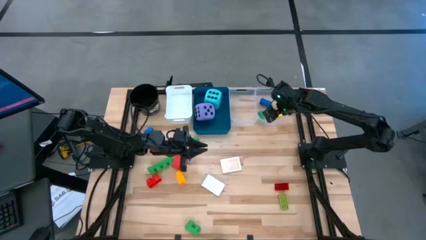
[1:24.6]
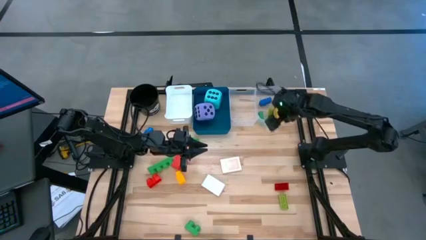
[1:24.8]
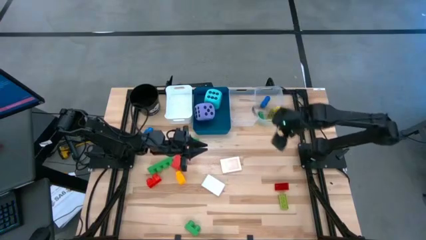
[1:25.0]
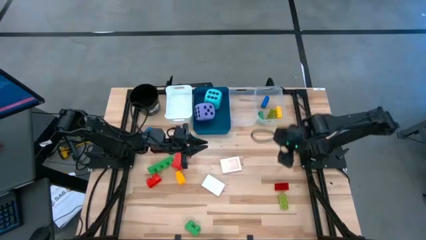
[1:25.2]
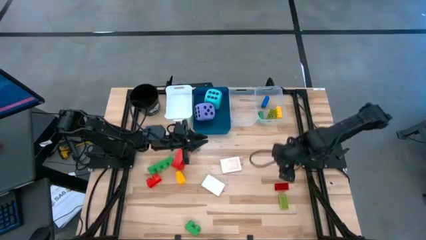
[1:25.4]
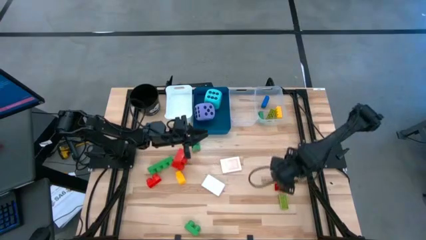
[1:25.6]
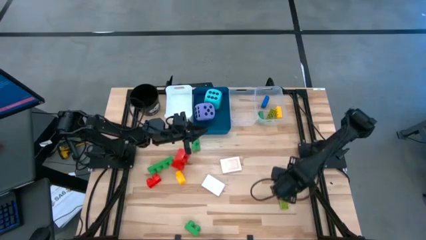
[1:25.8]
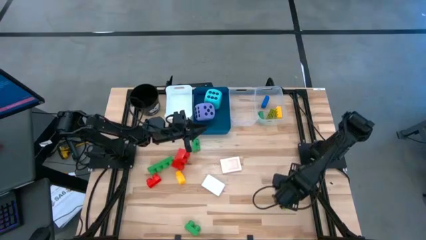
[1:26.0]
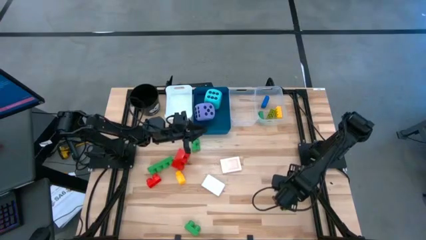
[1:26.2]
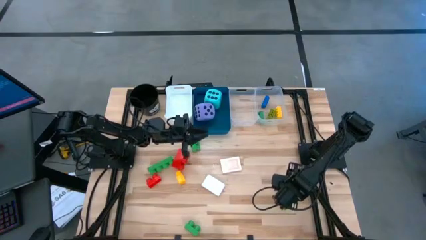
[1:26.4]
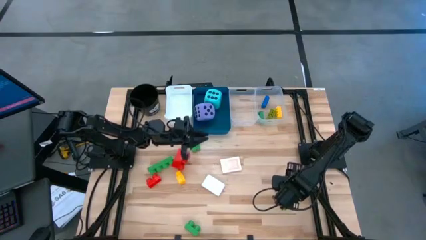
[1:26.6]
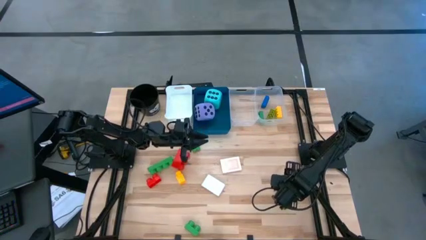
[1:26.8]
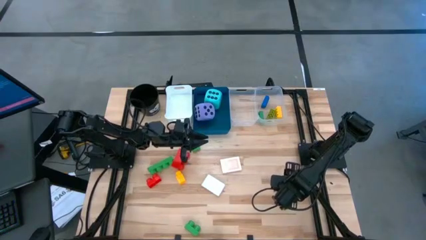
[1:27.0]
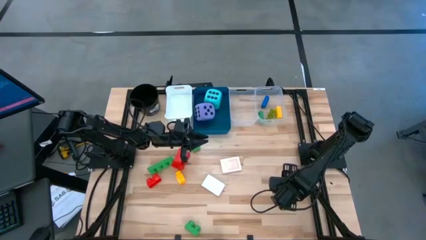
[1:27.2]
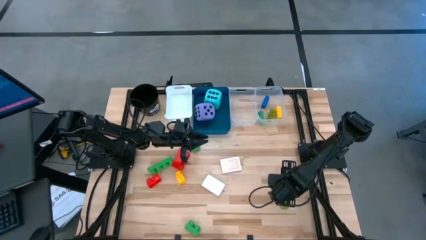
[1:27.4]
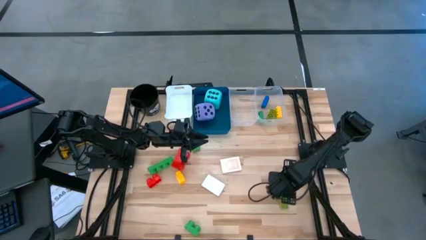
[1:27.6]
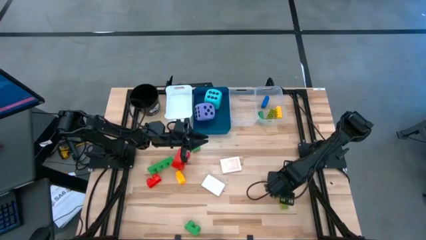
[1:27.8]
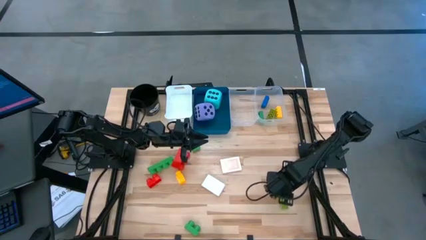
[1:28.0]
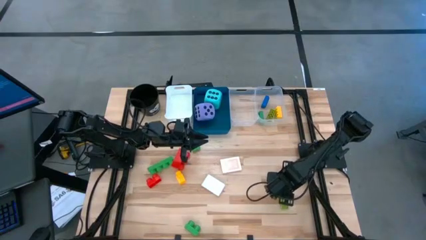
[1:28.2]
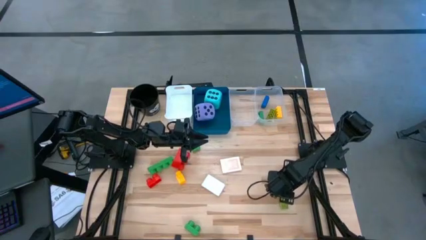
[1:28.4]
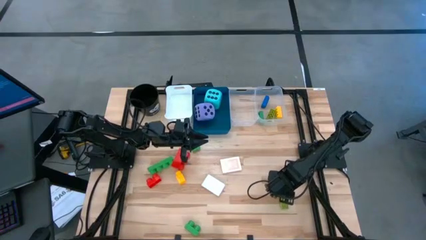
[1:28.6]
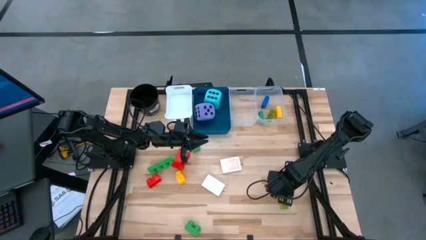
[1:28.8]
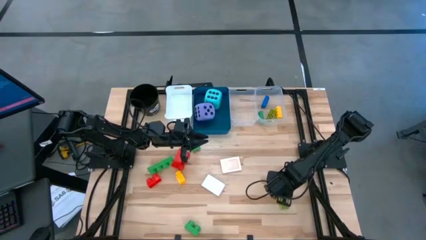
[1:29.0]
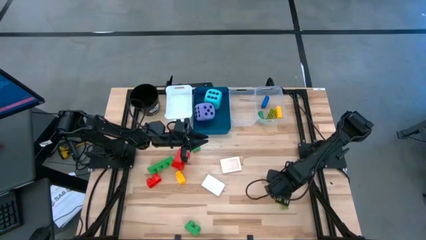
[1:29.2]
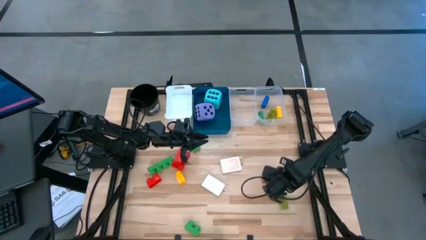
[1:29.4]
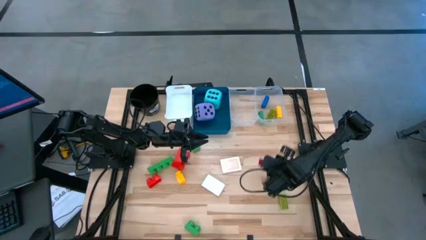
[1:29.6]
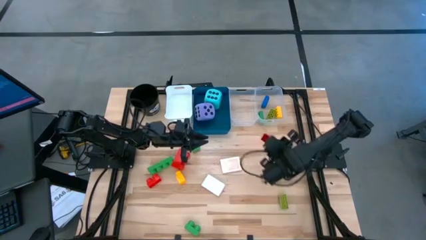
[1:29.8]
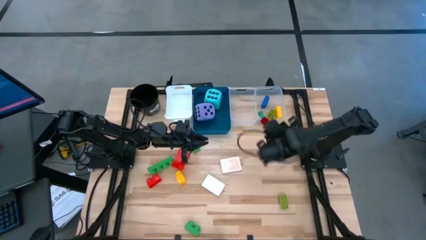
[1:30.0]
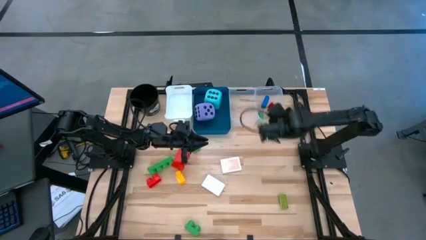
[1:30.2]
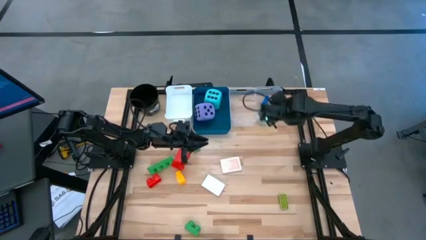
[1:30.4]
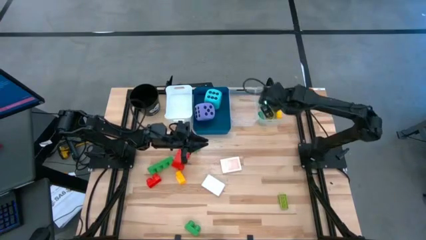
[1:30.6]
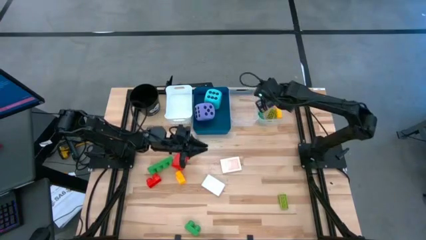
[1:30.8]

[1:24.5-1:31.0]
Task: Pick & Place Toys
Put the small red game piece into the right transparent bin

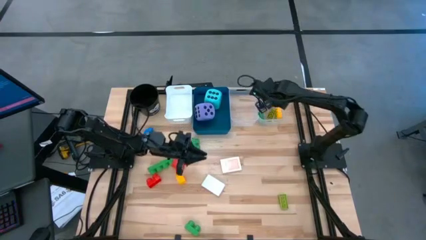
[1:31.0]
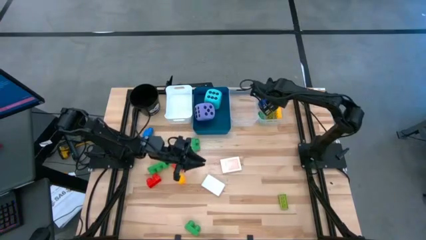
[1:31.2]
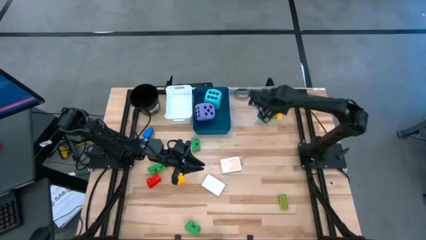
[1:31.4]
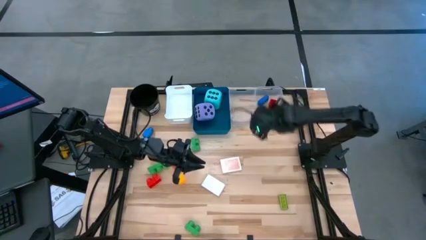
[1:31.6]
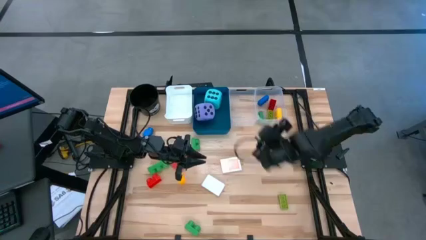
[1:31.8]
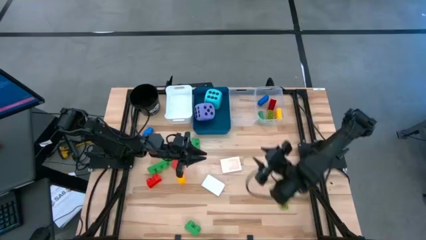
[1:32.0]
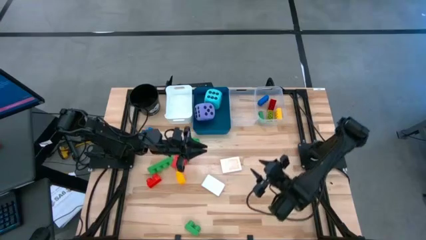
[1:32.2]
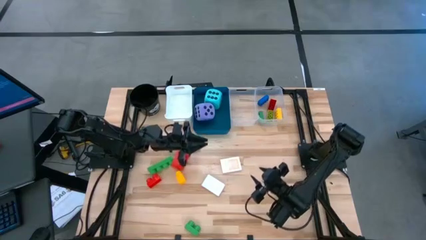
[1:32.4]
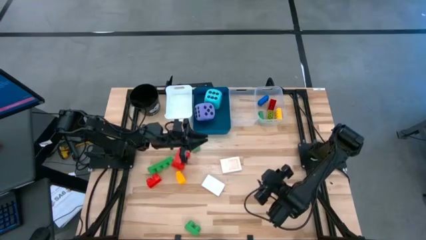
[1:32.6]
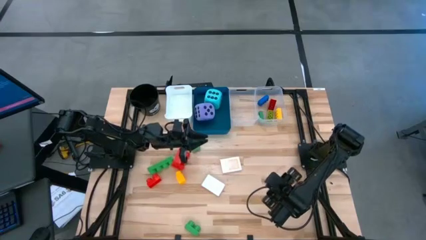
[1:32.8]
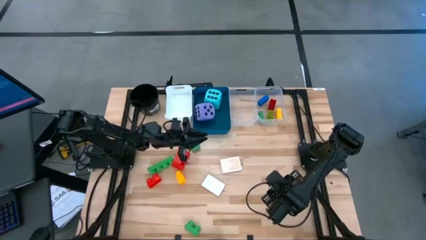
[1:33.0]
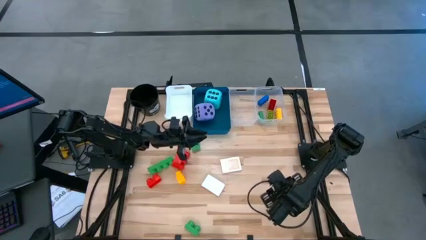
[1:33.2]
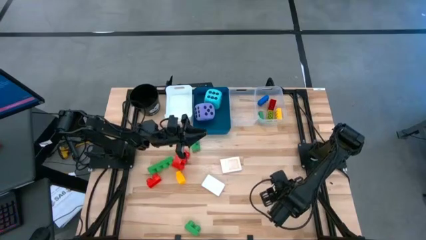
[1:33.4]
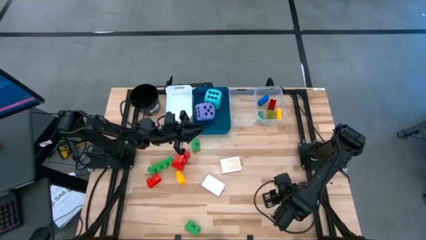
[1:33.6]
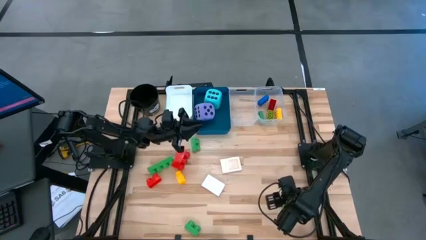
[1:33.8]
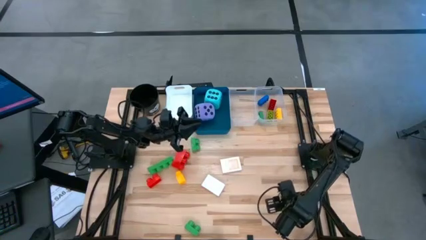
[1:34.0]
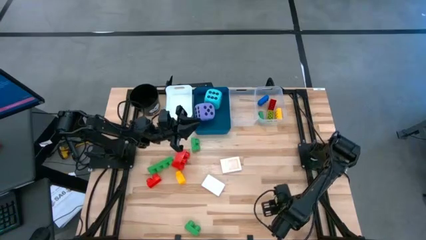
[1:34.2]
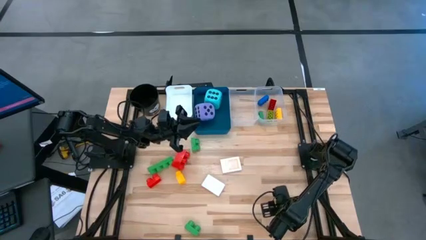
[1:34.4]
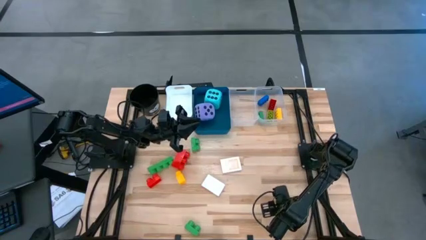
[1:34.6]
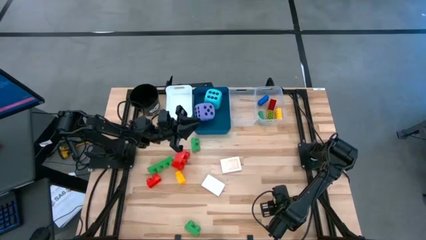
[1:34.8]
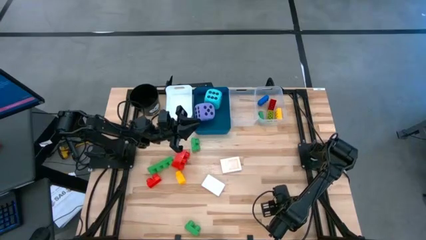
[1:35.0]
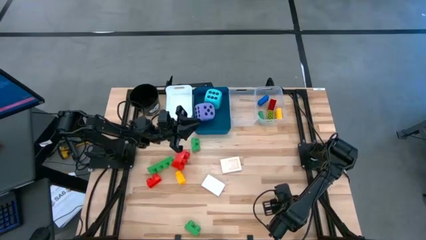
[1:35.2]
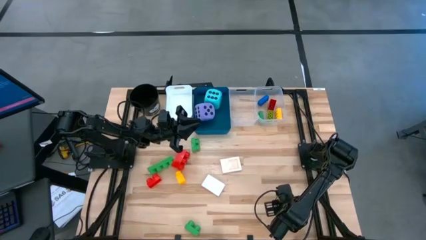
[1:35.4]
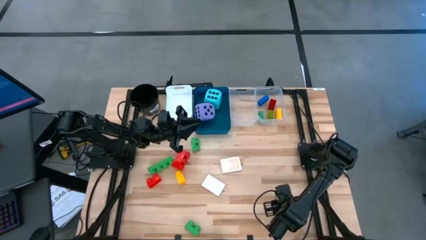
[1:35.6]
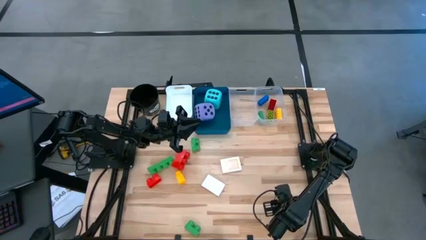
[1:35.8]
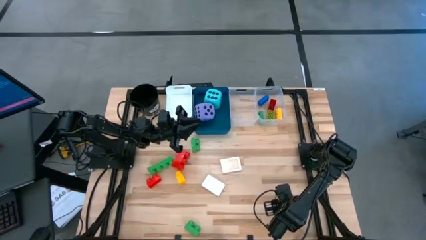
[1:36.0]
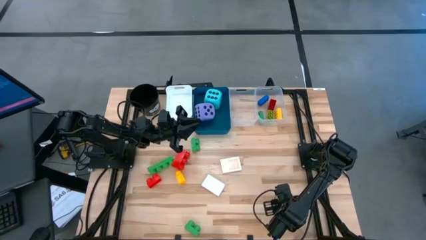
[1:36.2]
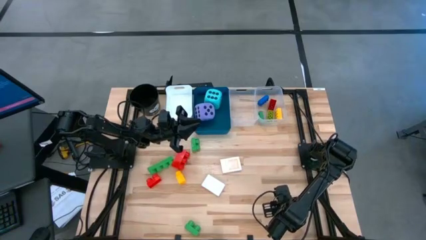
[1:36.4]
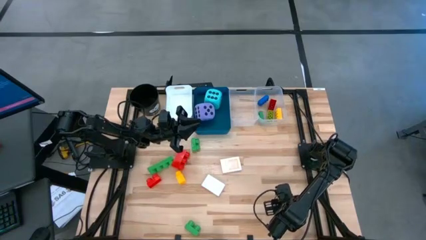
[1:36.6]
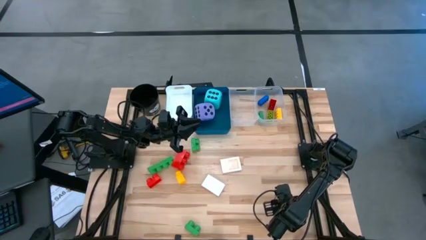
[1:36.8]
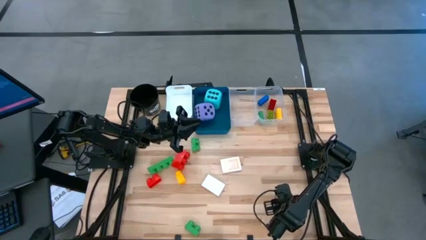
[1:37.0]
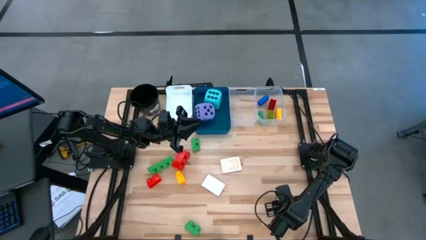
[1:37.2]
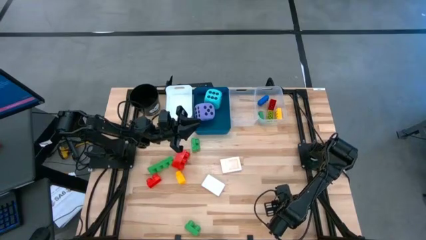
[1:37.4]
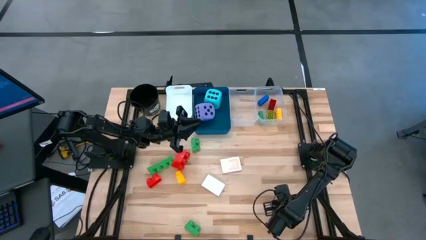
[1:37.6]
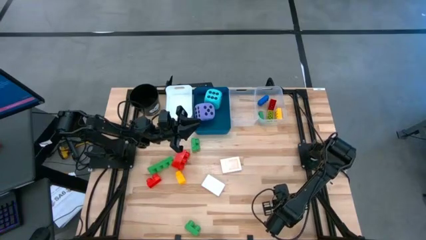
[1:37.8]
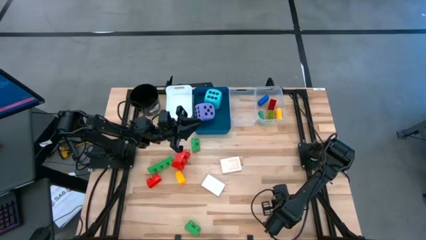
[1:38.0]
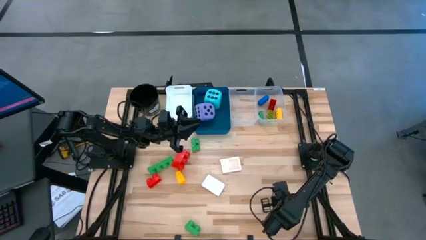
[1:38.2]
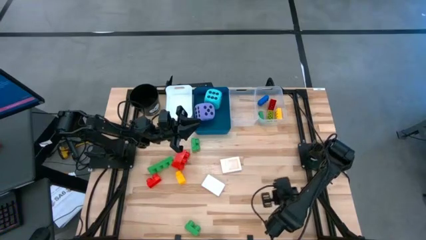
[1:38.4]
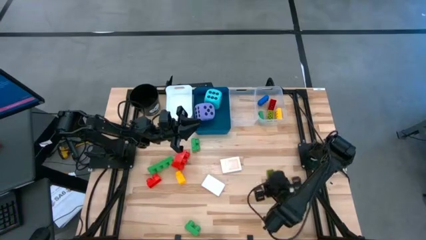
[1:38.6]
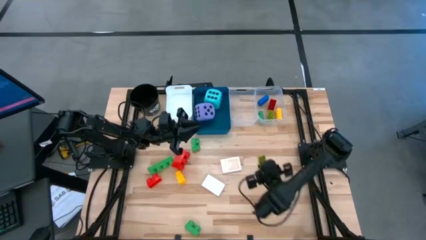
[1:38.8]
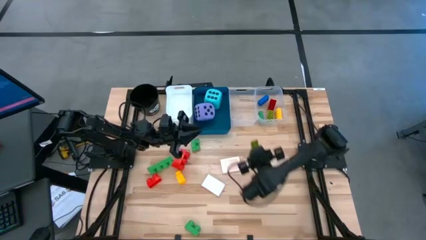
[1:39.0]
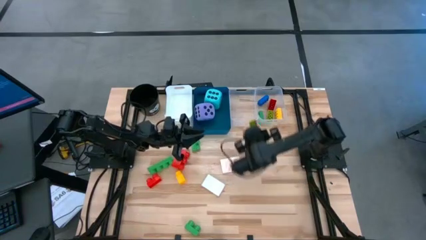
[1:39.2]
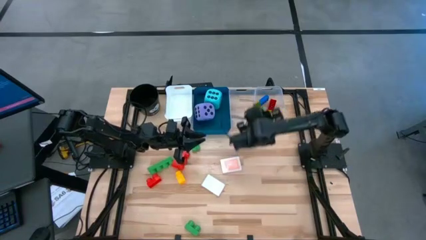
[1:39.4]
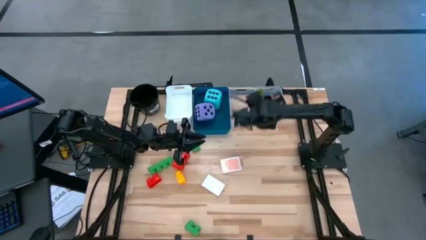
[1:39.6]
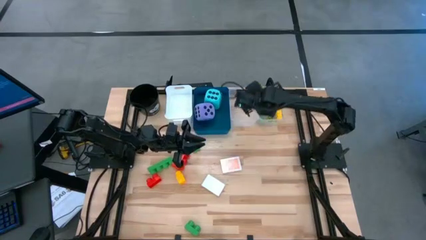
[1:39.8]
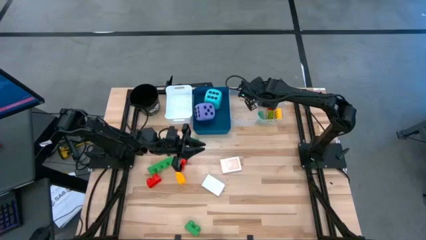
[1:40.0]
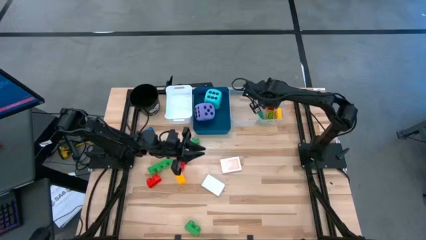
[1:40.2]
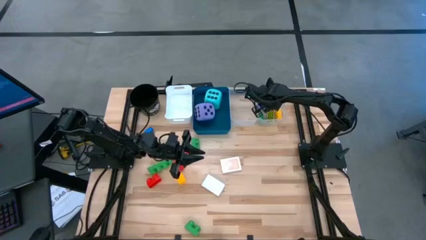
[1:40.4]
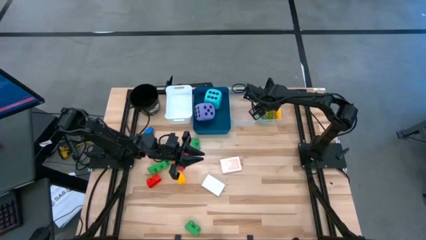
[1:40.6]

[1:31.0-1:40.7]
Put the left small yellow and green game piece into the right transparent bin
